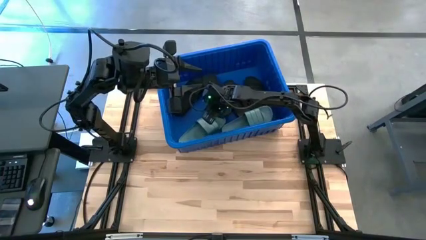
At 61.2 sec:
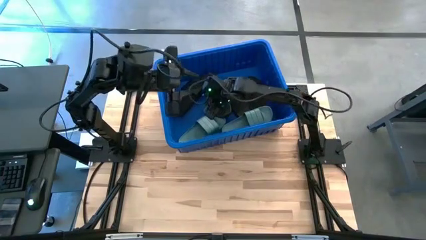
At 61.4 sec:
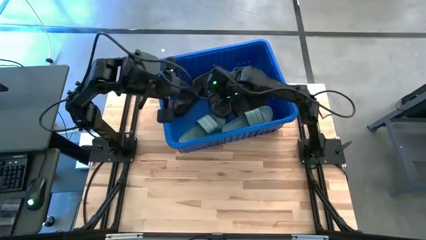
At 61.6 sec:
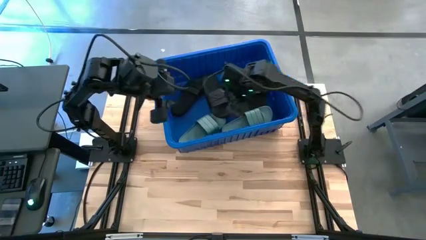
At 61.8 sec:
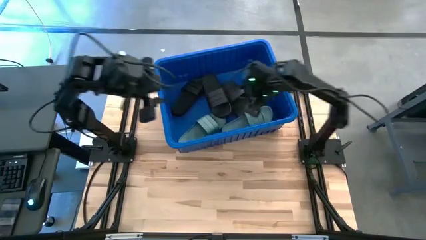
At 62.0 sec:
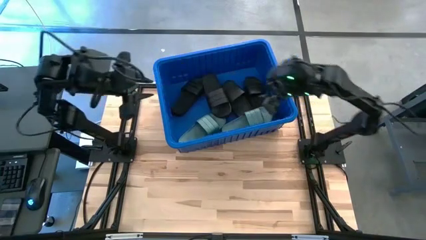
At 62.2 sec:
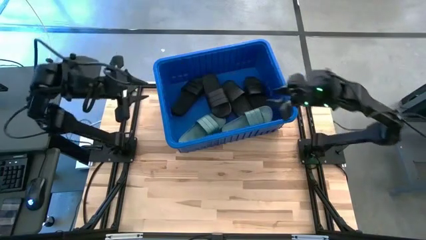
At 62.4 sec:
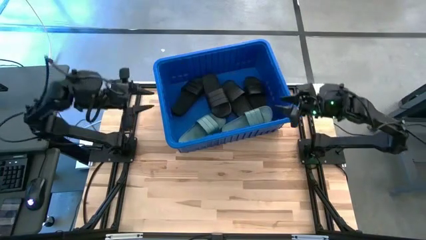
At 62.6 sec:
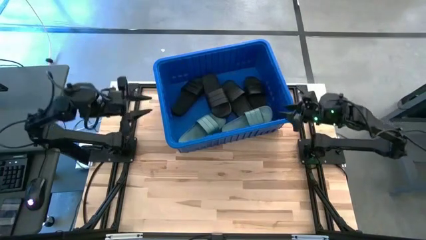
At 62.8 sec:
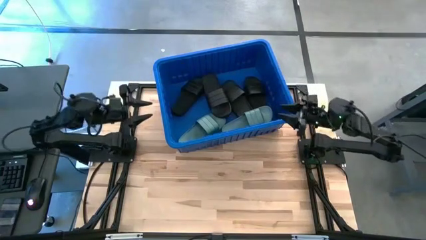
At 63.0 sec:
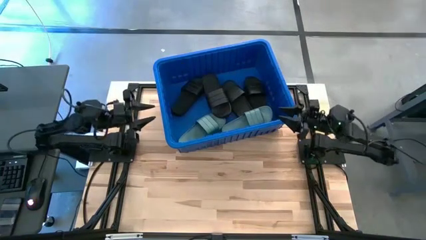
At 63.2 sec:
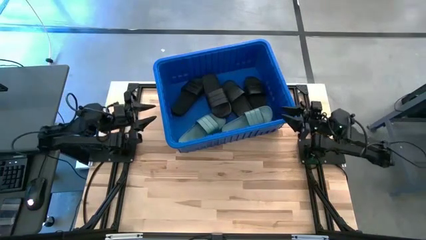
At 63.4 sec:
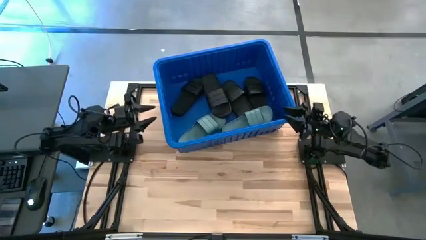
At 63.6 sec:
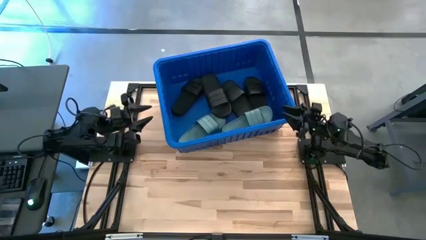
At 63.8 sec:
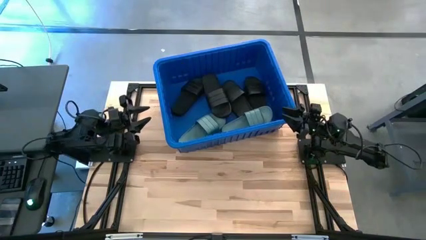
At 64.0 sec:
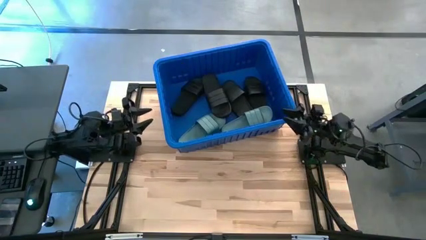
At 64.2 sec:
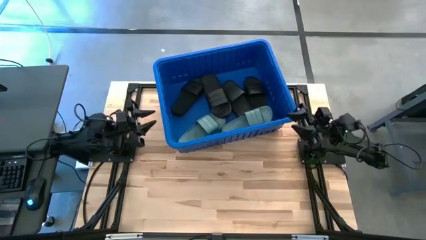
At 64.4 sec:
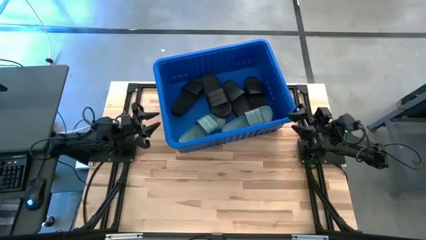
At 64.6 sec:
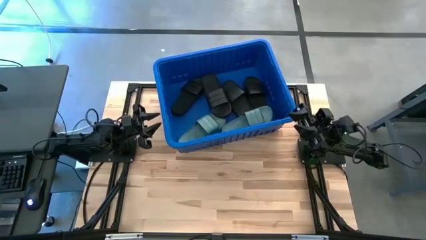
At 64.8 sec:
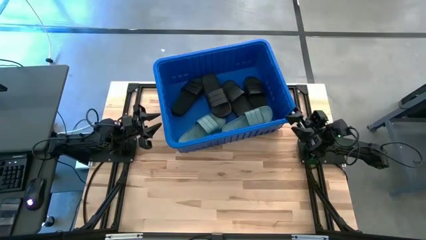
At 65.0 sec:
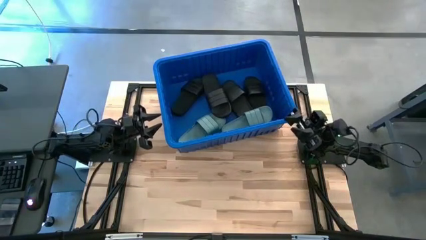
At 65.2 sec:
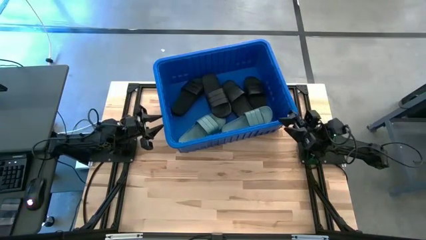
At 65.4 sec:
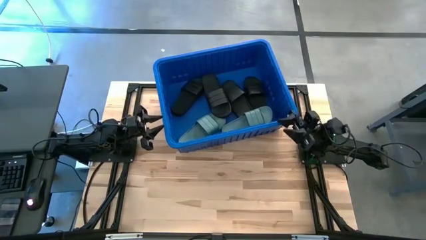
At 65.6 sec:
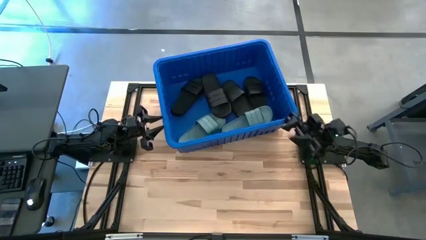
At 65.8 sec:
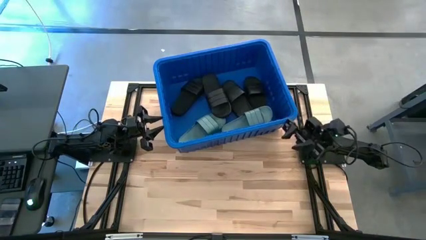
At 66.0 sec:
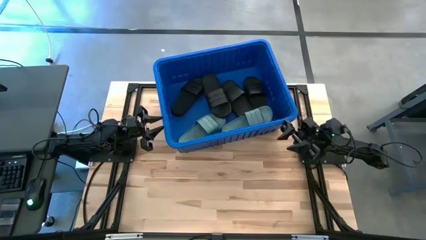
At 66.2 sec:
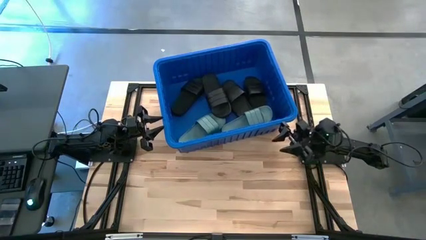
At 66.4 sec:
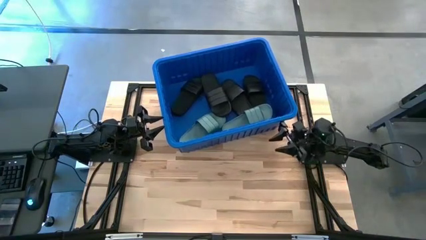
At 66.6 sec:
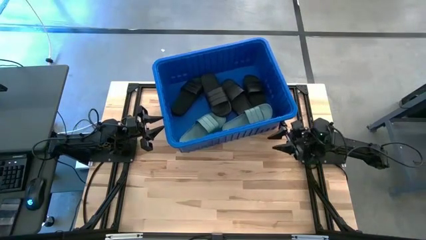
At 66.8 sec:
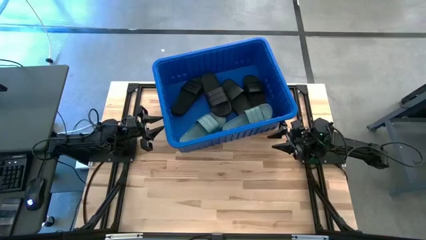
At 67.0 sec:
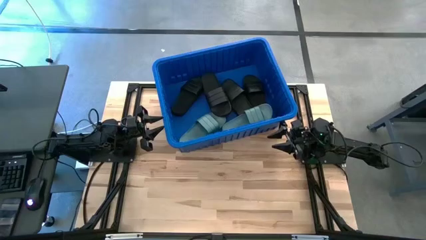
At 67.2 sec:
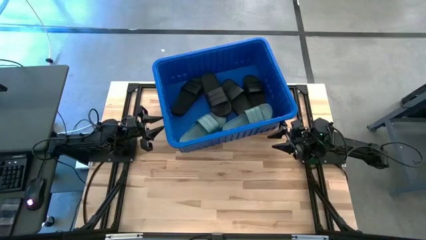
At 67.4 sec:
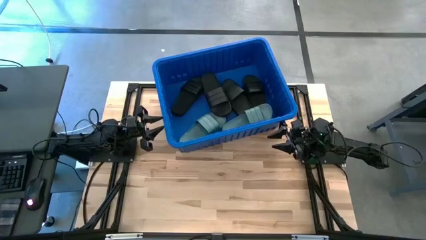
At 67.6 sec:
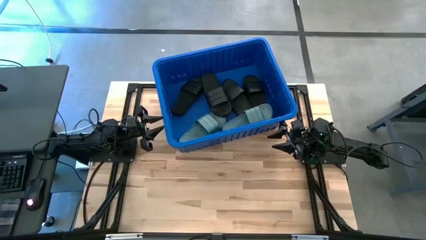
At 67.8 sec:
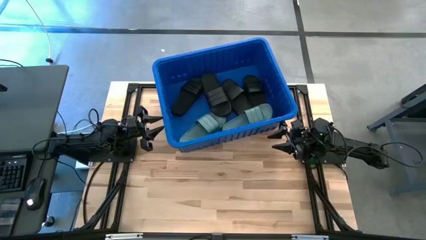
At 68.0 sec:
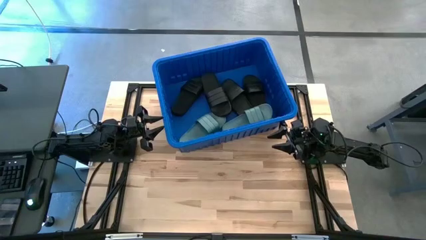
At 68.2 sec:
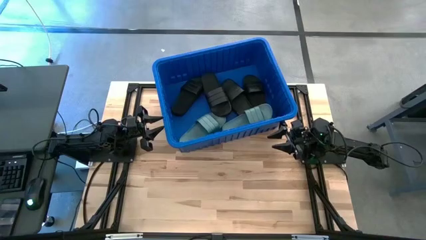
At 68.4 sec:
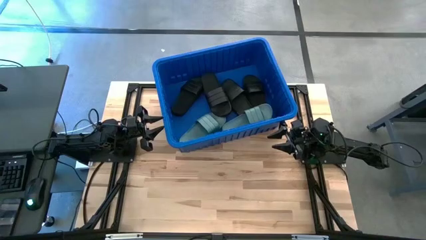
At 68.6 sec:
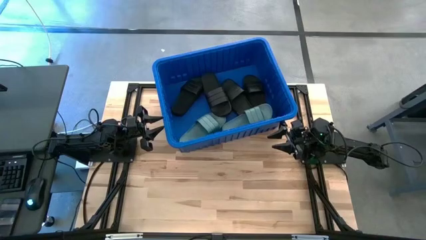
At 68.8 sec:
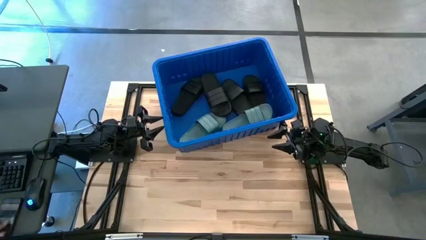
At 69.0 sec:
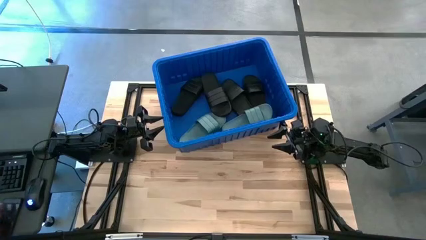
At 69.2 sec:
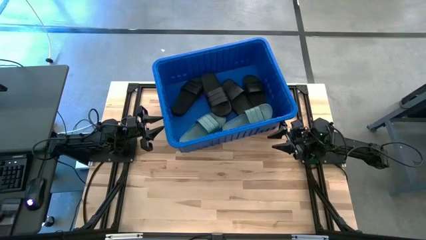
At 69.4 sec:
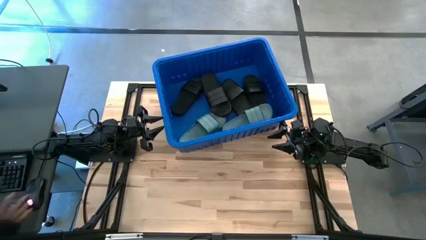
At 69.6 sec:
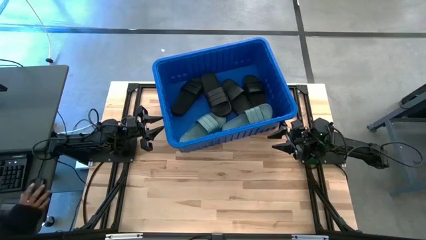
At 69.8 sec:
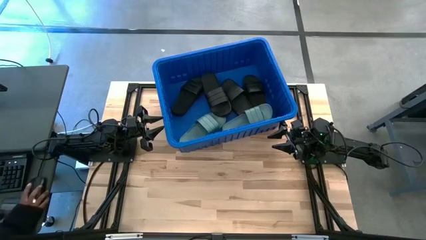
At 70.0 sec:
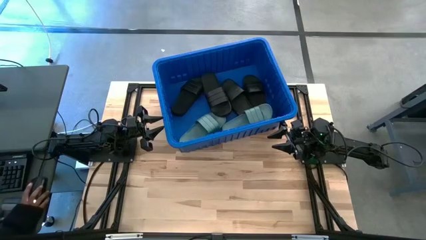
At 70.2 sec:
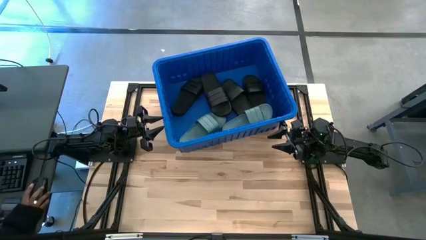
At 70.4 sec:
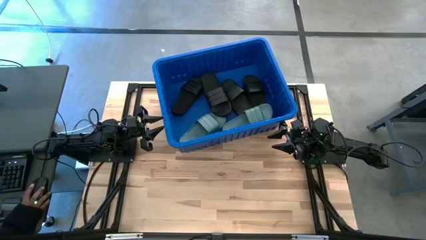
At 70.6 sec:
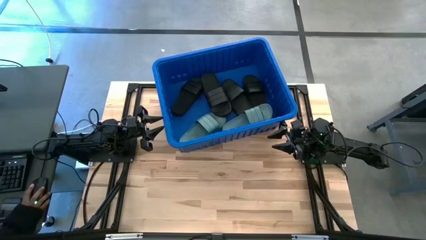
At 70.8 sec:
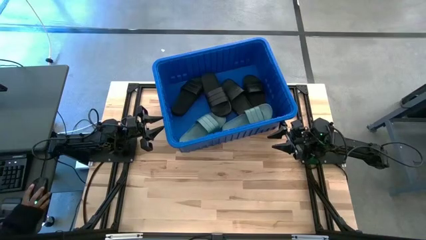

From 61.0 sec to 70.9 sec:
Task: Pick and place slides into bin
Return to Home Position

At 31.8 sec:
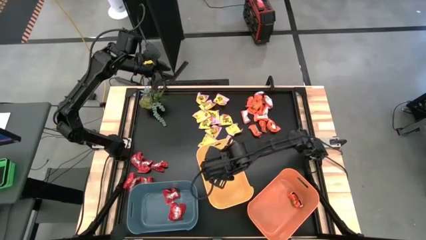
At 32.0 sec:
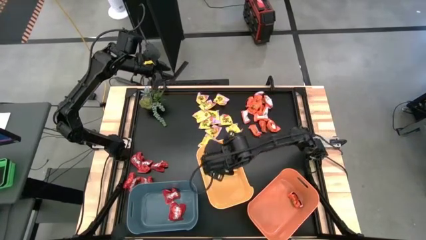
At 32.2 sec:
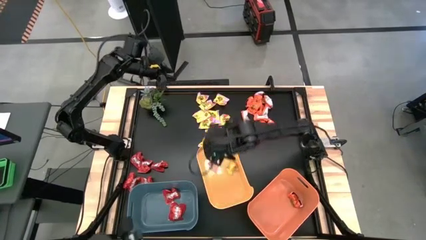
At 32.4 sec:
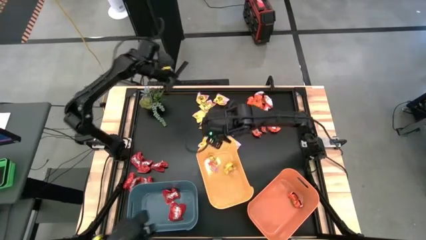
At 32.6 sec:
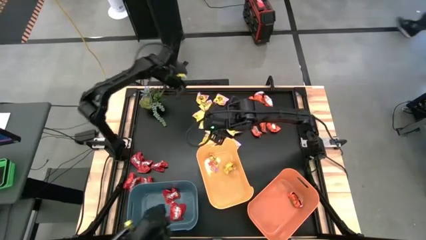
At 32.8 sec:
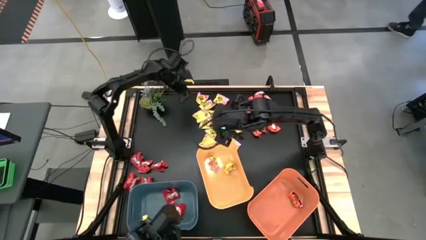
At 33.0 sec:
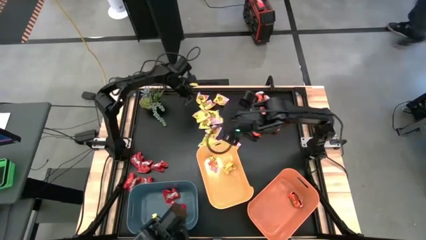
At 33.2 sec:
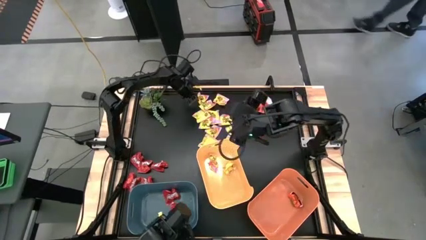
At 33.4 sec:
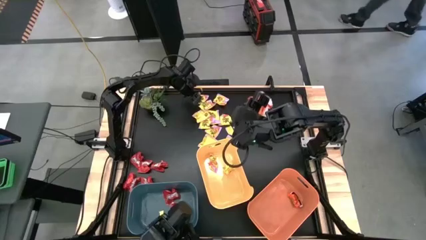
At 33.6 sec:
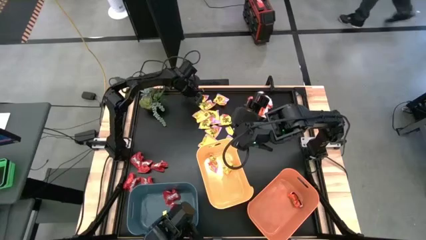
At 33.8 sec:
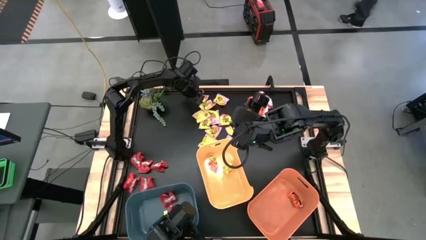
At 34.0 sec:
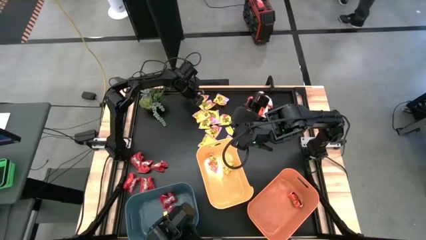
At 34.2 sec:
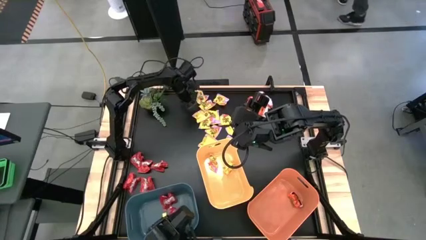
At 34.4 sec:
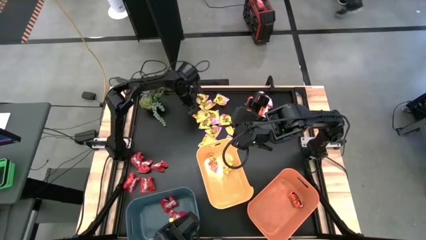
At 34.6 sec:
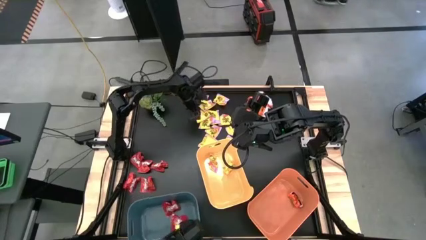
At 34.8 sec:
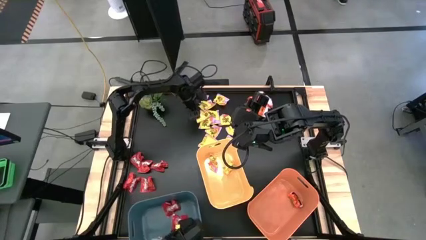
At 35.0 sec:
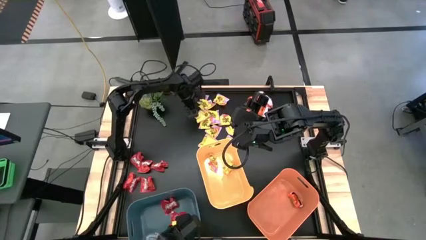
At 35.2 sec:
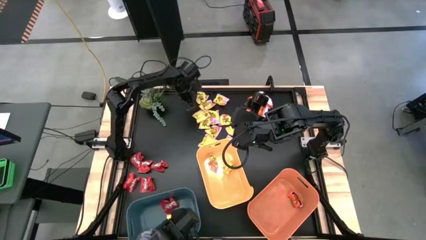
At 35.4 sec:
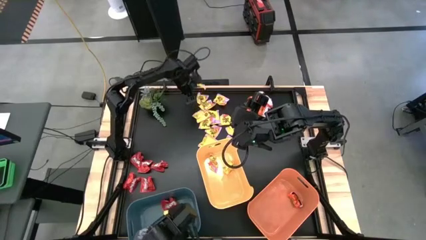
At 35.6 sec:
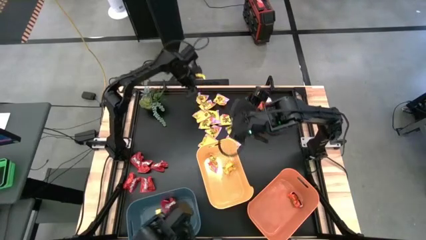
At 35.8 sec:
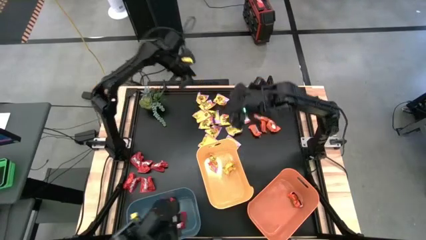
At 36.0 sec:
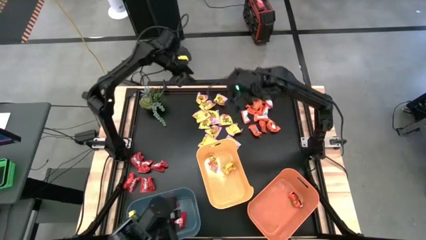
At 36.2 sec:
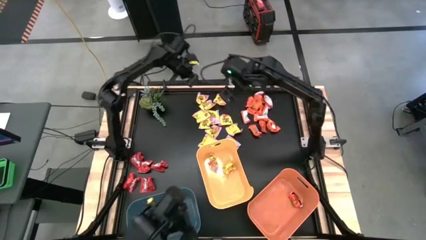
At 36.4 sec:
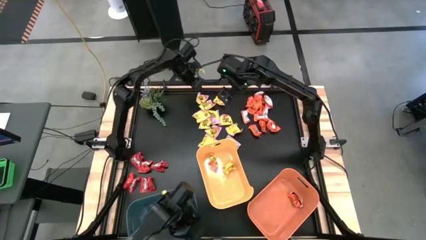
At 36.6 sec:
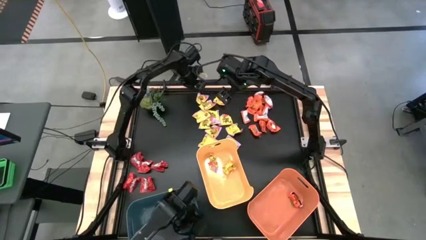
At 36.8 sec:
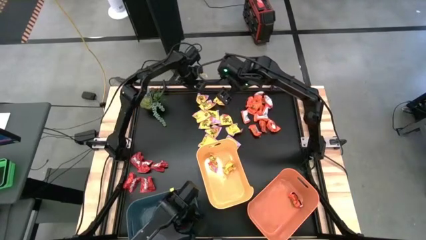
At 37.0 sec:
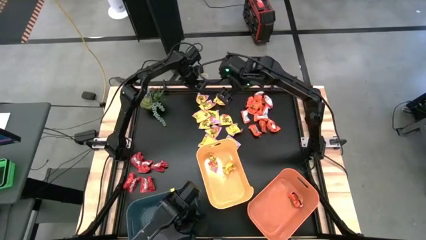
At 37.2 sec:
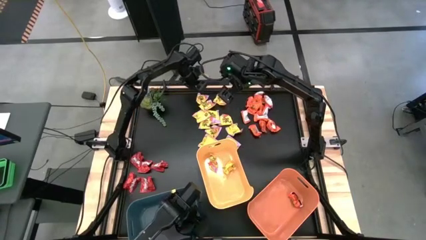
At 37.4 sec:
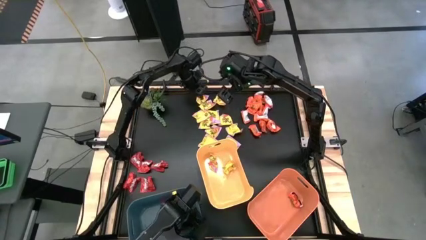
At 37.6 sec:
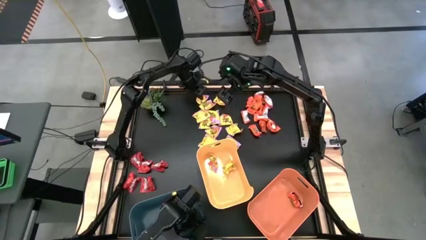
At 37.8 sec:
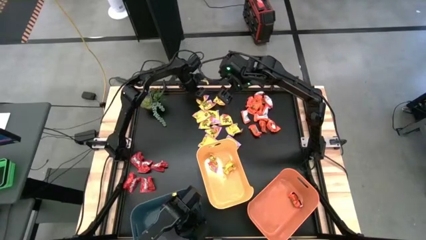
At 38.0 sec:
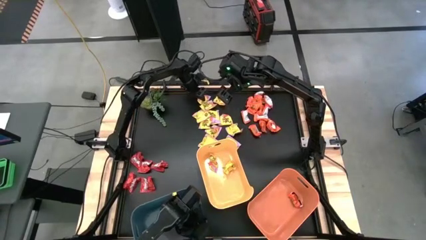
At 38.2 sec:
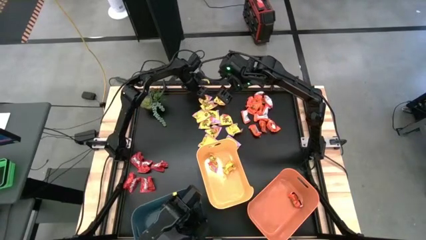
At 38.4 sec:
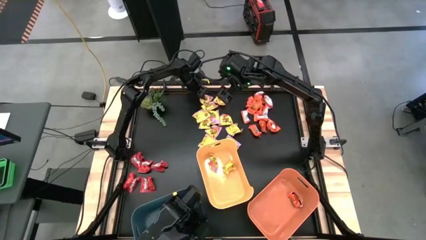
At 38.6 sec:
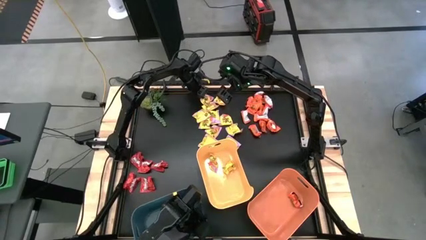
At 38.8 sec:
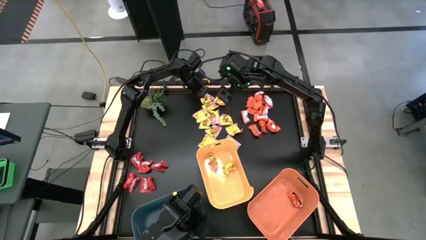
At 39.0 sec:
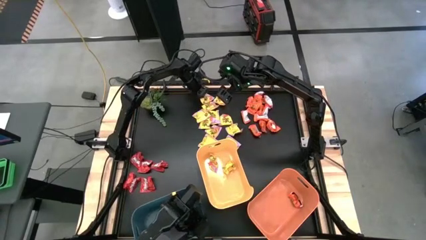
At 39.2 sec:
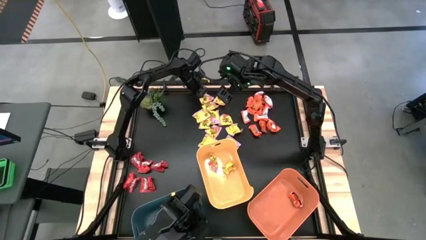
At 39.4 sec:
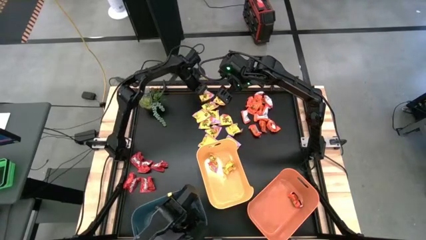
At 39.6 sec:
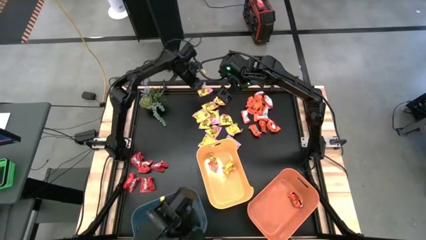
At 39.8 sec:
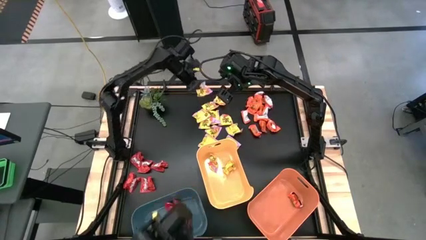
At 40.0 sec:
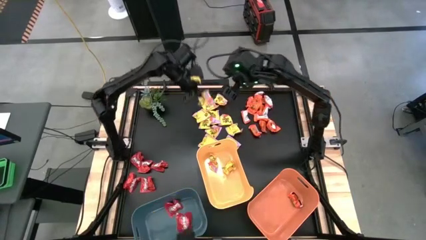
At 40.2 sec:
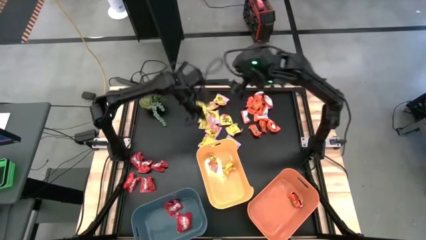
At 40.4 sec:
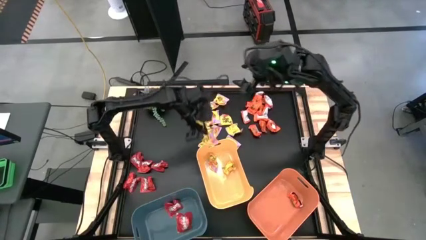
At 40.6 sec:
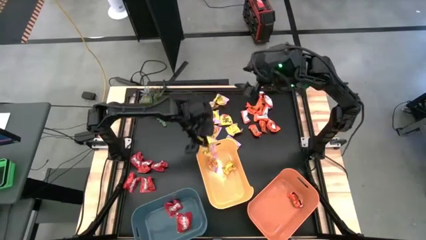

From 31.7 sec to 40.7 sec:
Task: Sort candy
Put the yellow candy into the yellow bin
